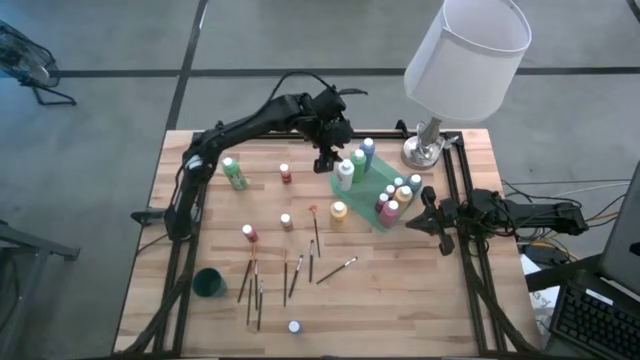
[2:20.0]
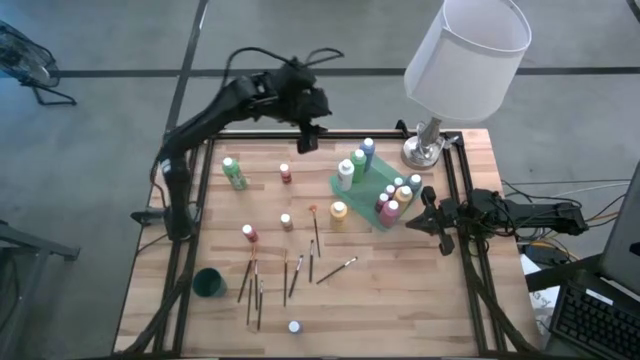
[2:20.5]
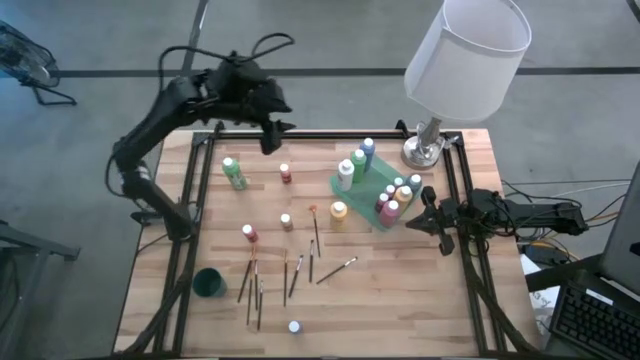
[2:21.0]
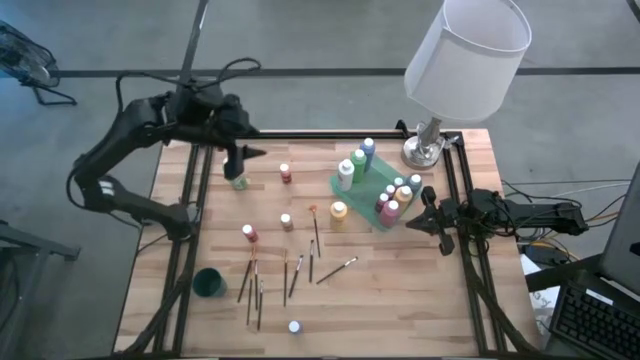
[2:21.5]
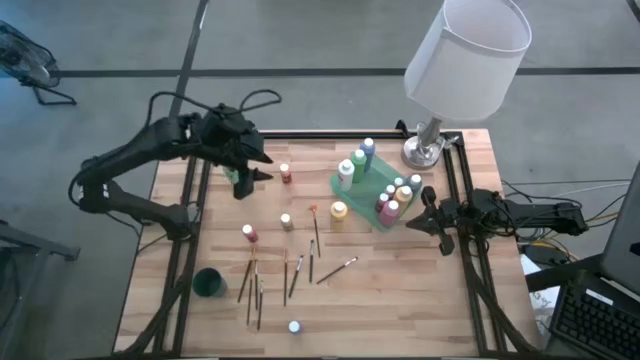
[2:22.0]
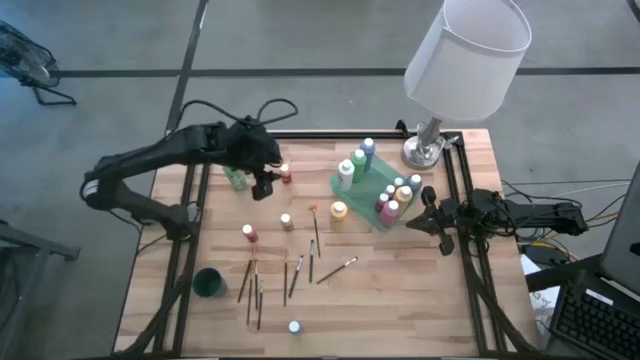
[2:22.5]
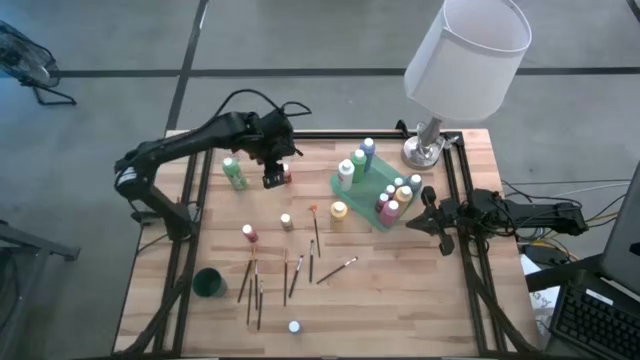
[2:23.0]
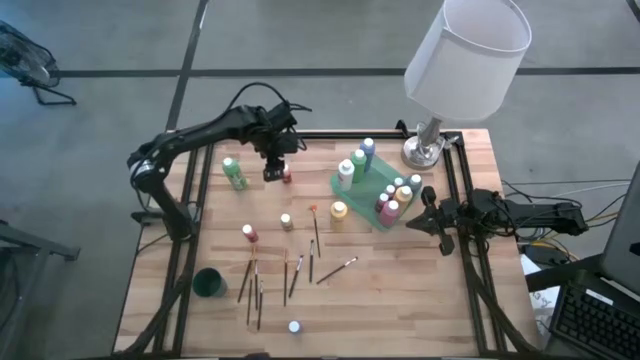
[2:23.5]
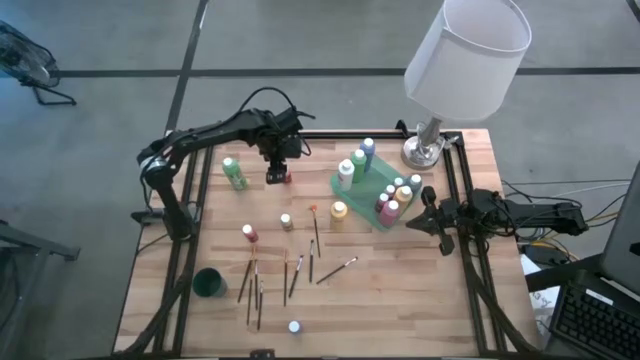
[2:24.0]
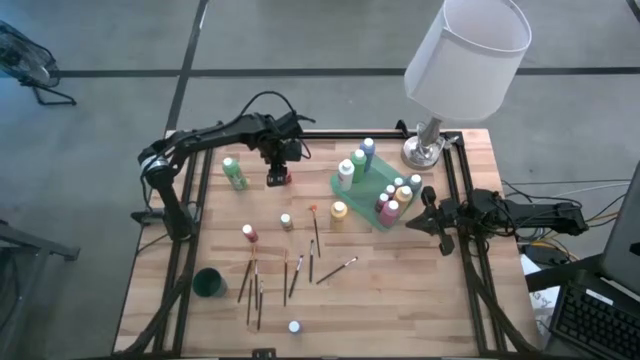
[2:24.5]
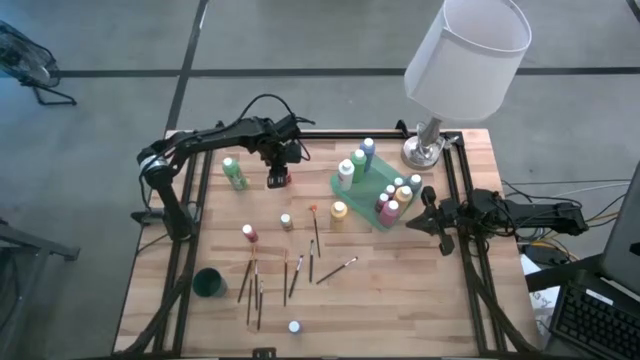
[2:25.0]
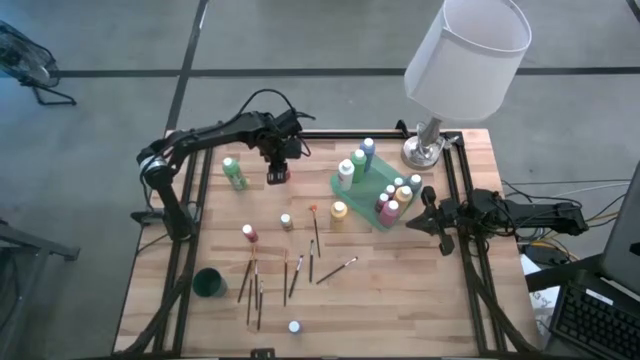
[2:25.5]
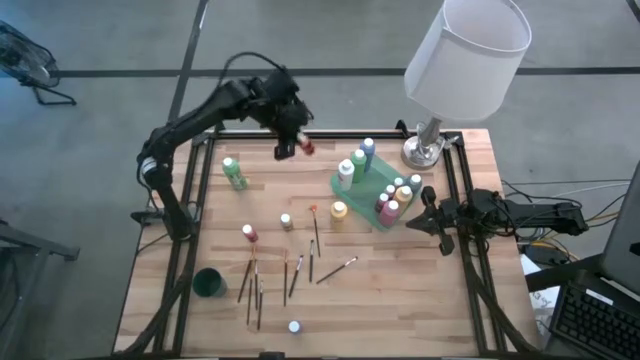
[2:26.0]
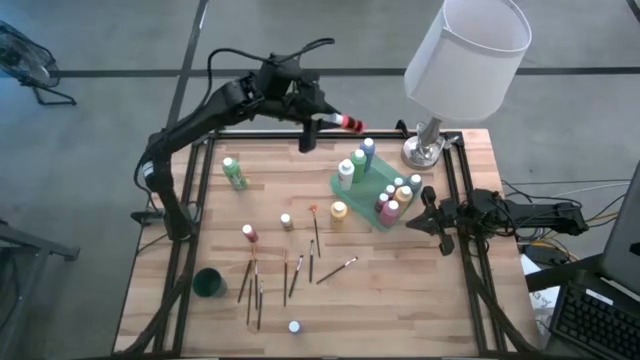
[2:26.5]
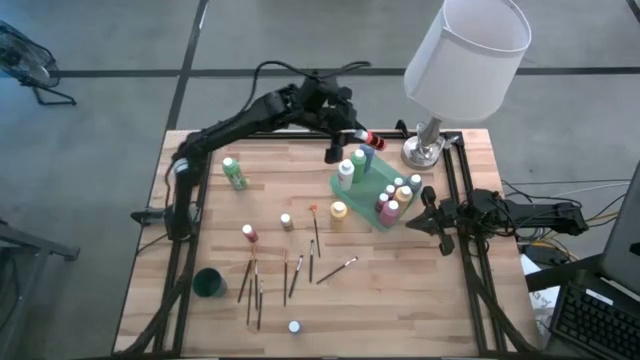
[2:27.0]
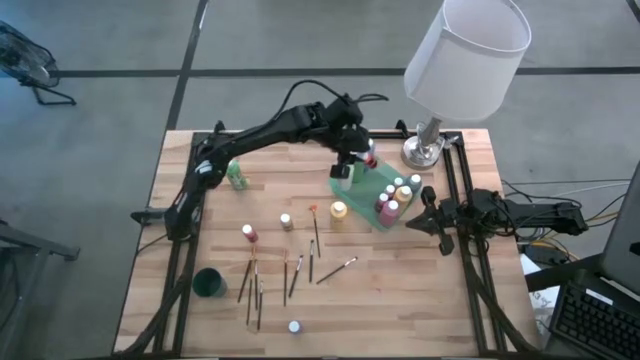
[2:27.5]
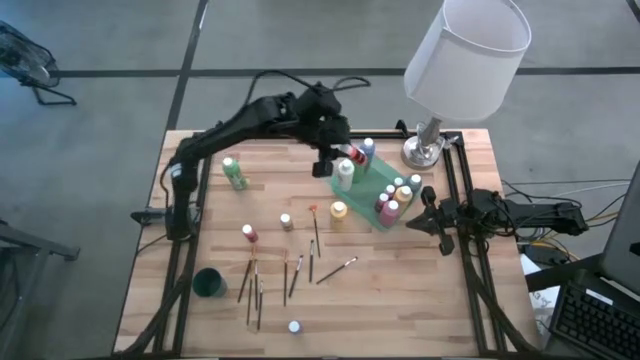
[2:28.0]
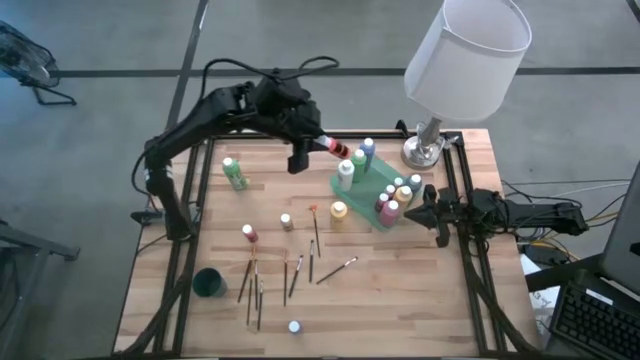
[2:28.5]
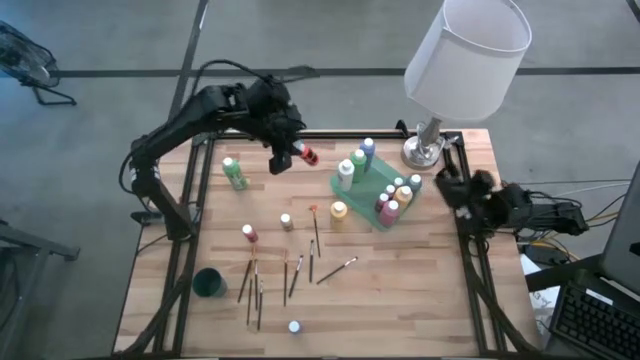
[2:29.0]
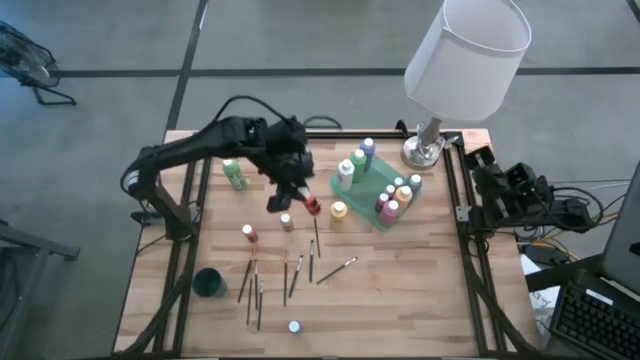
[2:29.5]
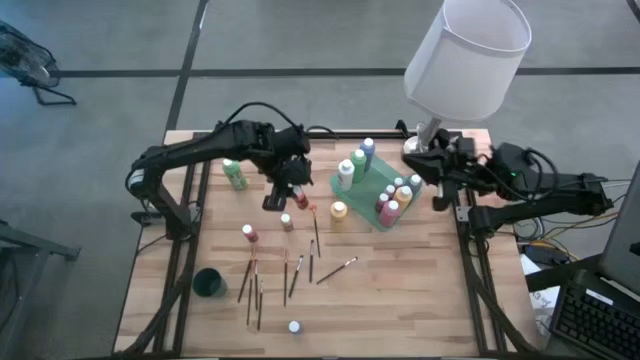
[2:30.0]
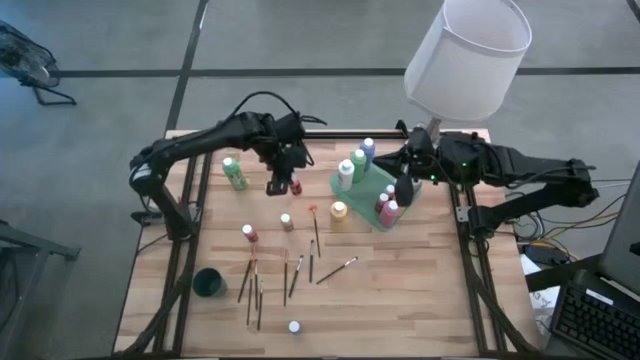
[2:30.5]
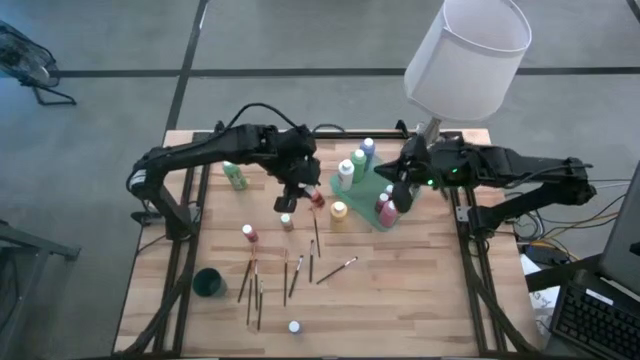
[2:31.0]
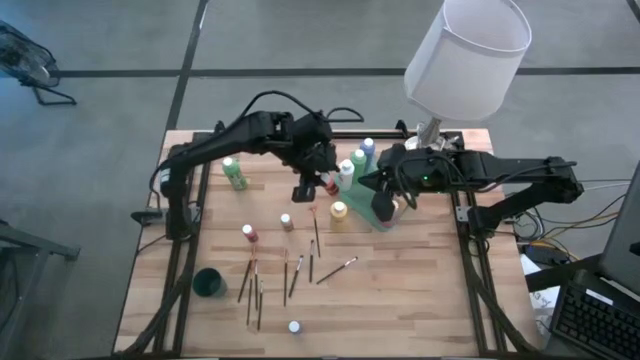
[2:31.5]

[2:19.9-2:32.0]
Task: Pick & Place Paint Supplies
Put the small orange paint bottle into the green bin

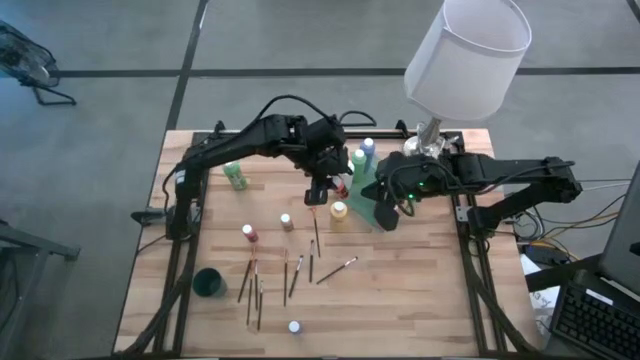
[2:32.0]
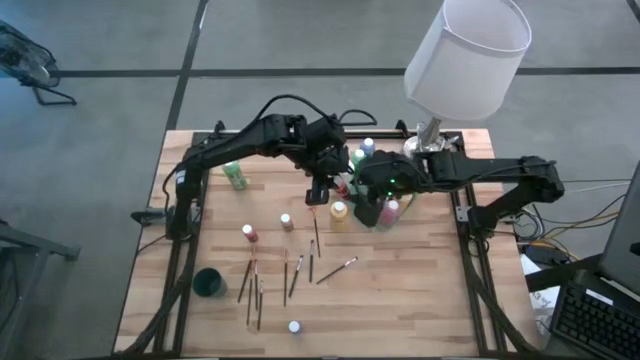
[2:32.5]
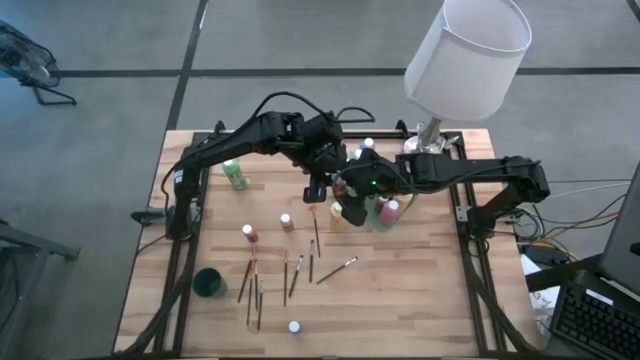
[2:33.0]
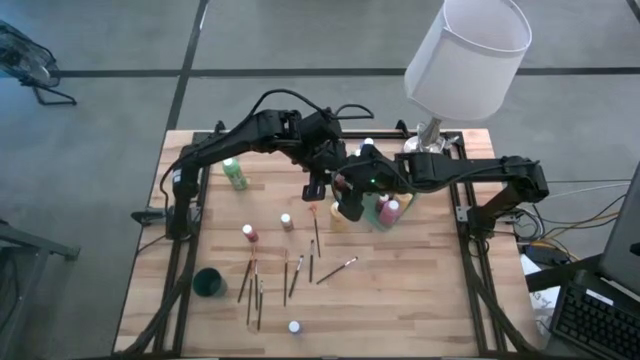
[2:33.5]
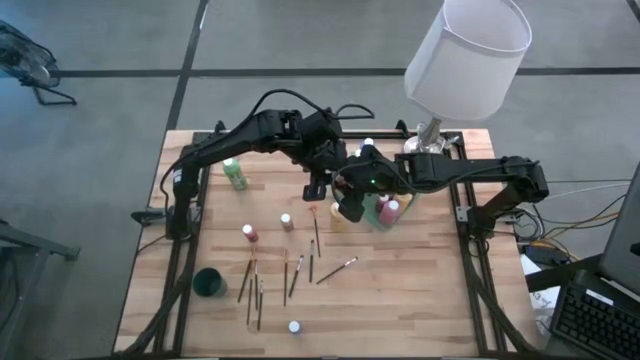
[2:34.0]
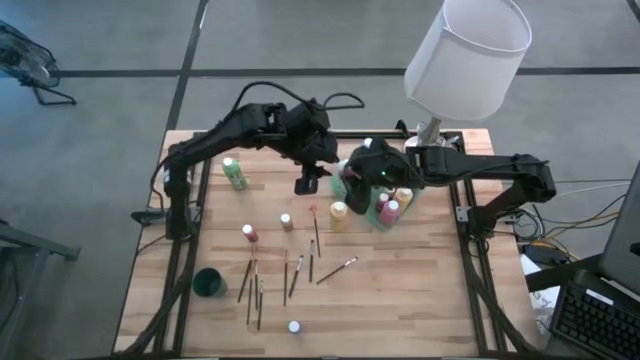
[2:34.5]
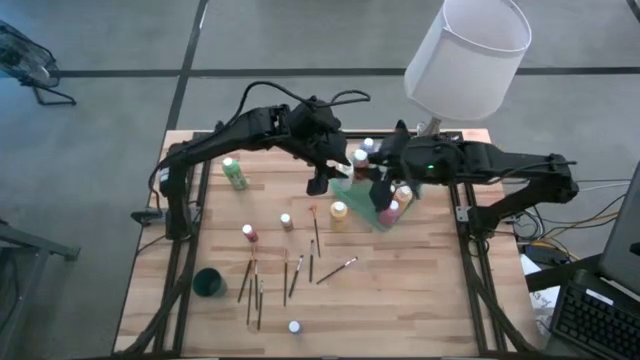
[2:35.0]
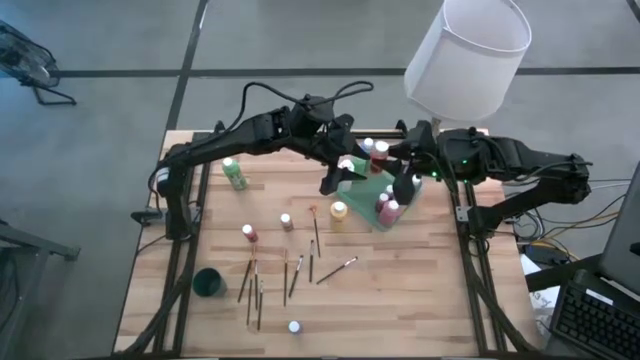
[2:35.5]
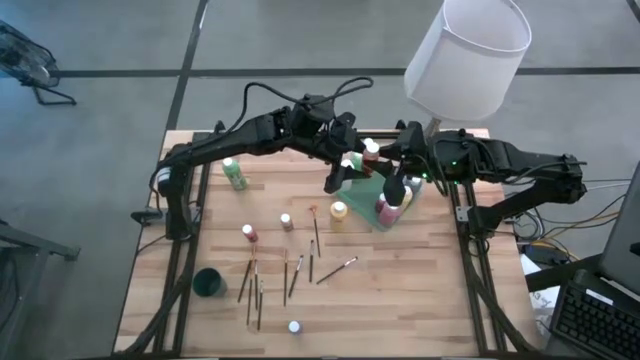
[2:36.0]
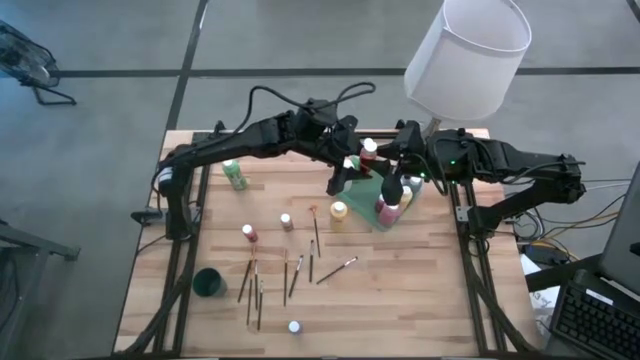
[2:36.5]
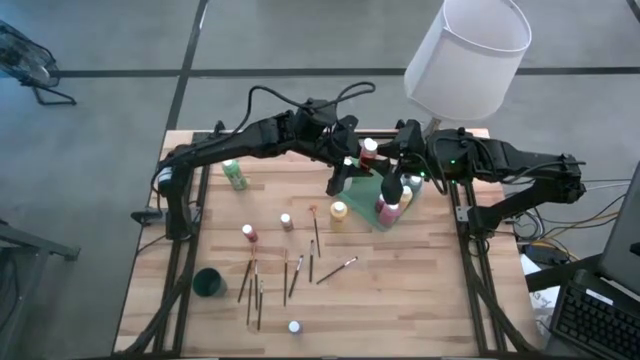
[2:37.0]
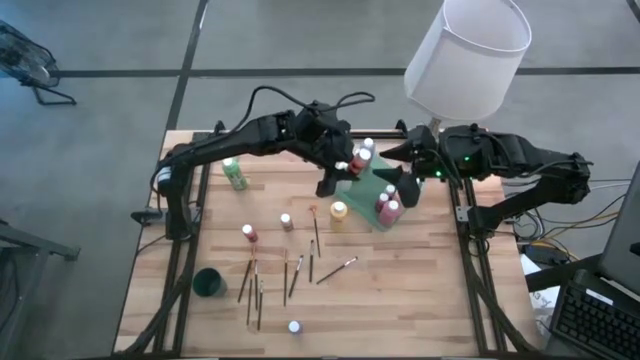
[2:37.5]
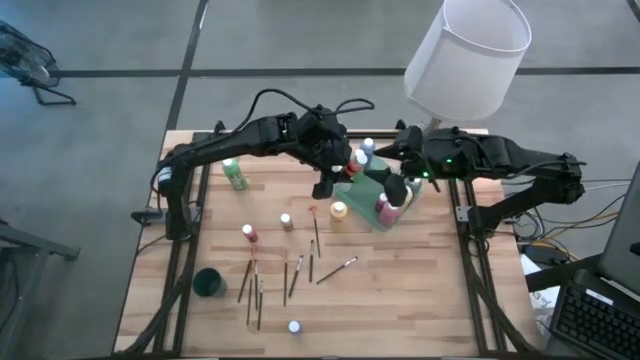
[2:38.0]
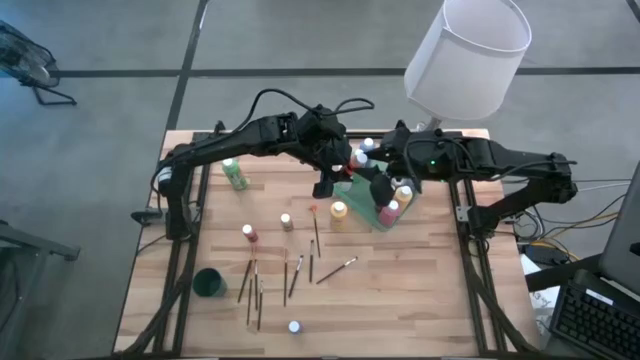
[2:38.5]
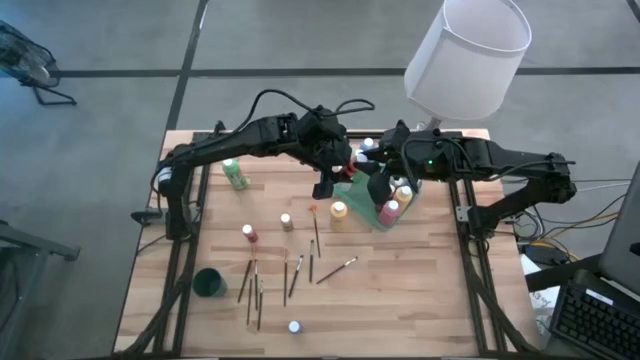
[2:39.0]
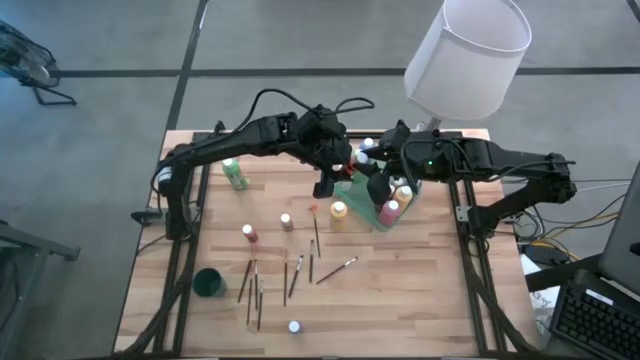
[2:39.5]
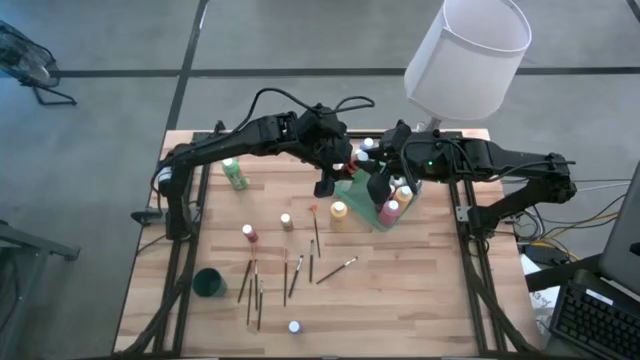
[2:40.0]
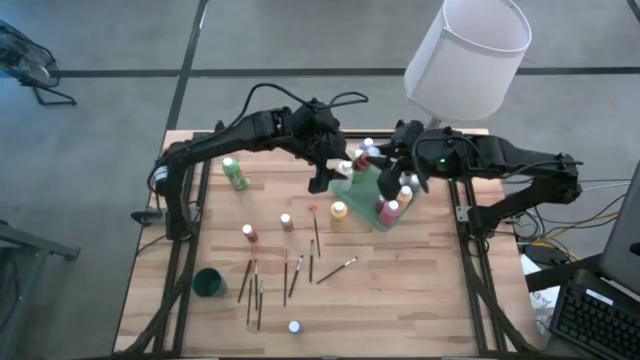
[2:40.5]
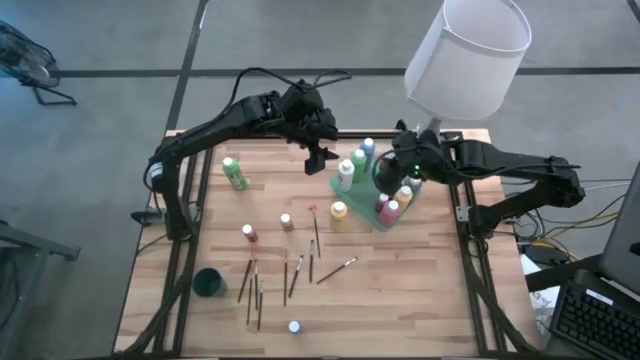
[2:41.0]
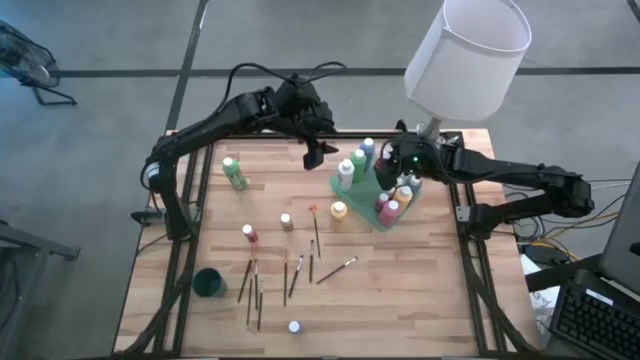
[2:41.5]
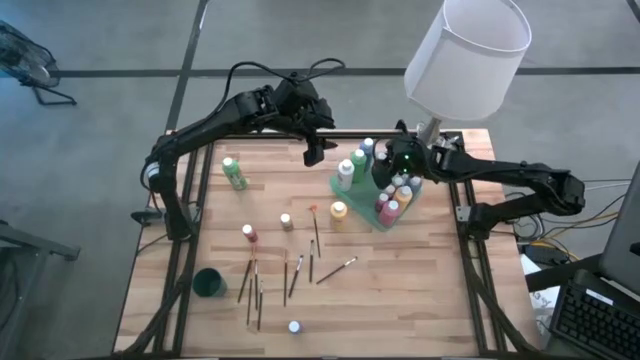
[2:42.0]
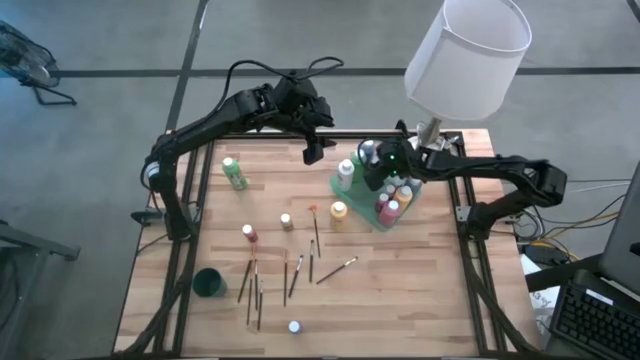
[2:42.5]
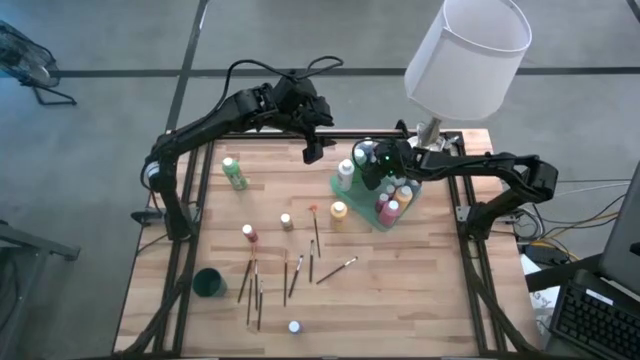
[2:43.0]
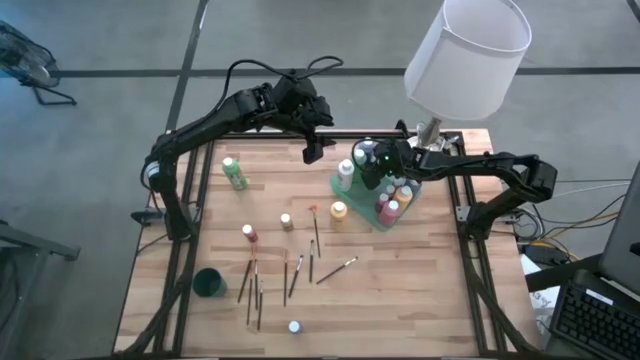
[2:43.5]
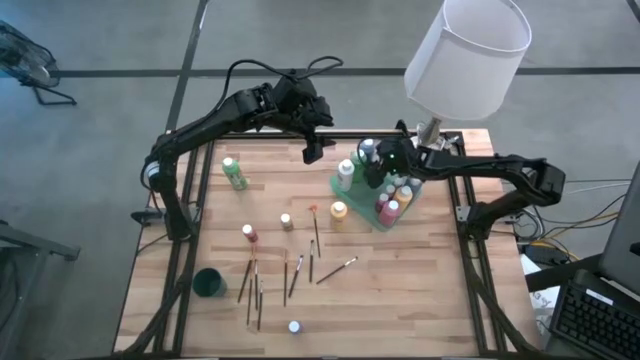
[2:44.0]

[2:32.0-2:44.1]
Put the small orange paint bottle into the green bin
